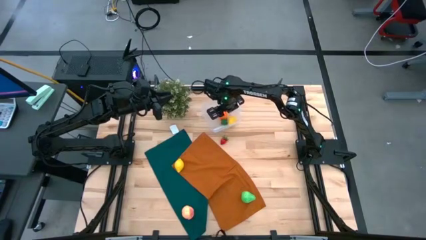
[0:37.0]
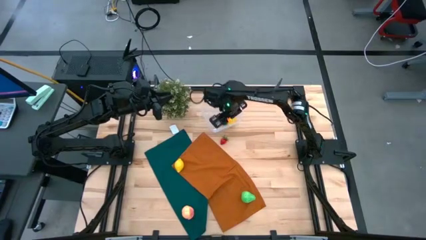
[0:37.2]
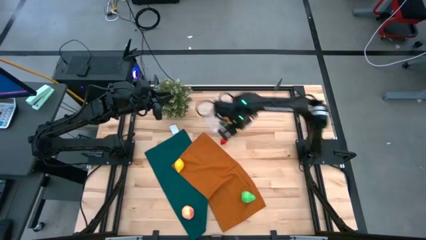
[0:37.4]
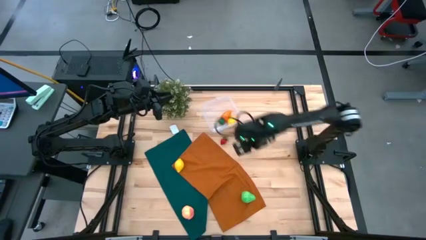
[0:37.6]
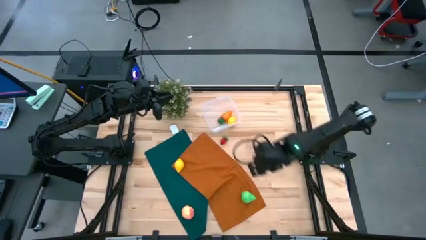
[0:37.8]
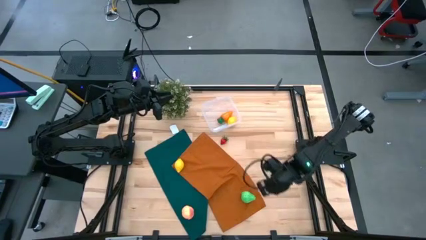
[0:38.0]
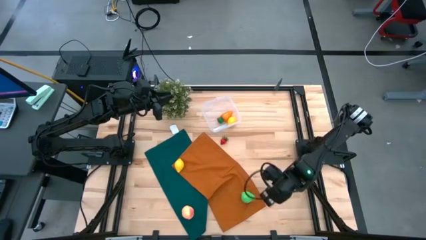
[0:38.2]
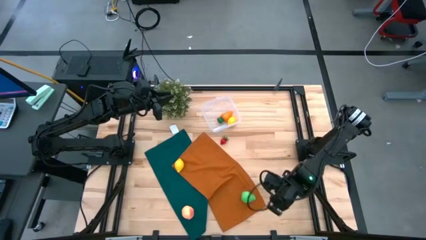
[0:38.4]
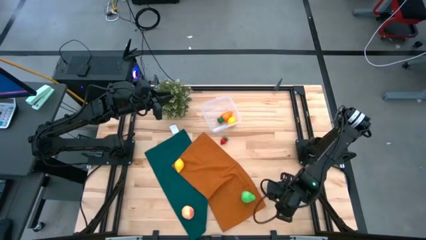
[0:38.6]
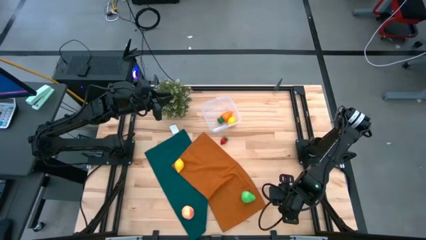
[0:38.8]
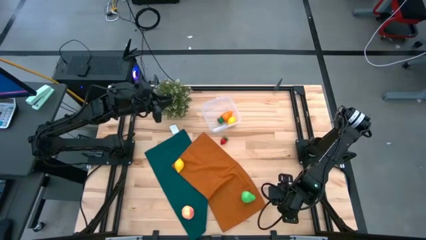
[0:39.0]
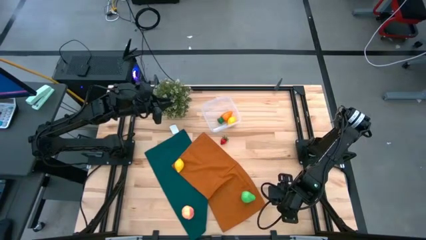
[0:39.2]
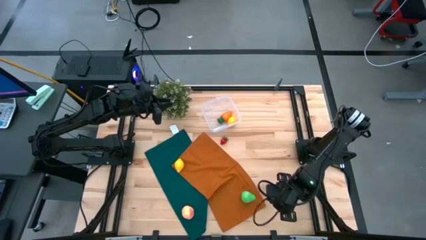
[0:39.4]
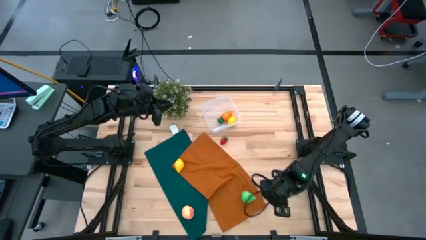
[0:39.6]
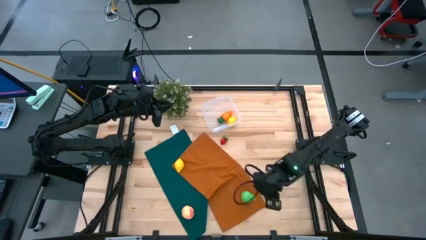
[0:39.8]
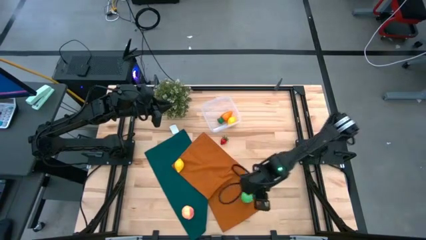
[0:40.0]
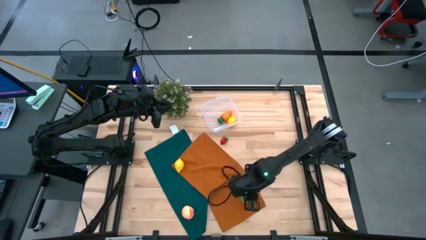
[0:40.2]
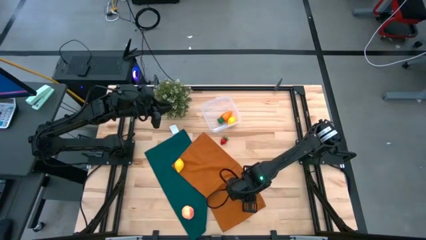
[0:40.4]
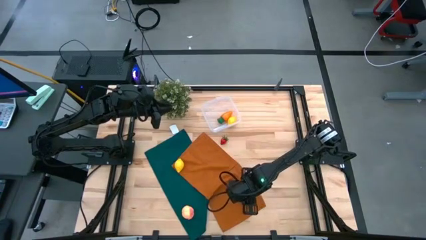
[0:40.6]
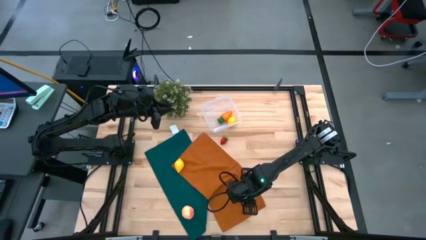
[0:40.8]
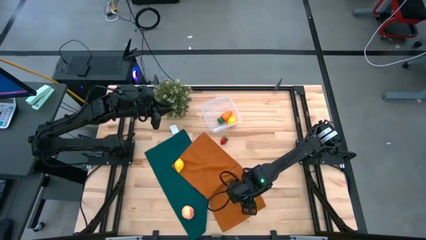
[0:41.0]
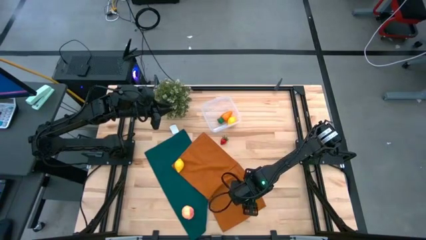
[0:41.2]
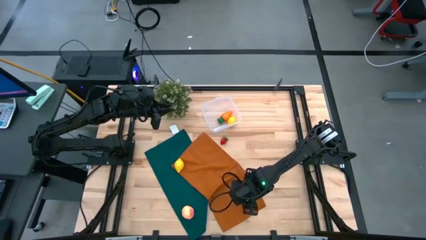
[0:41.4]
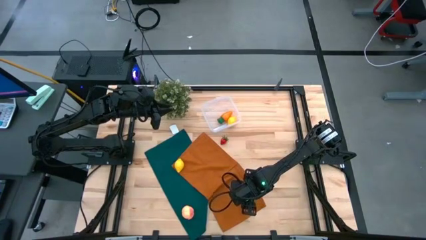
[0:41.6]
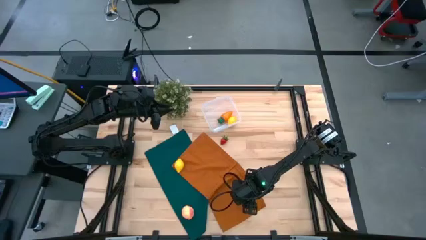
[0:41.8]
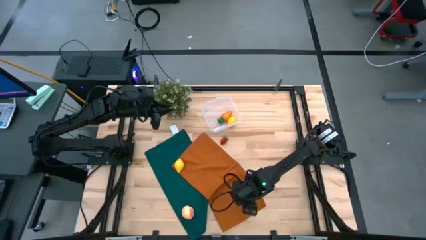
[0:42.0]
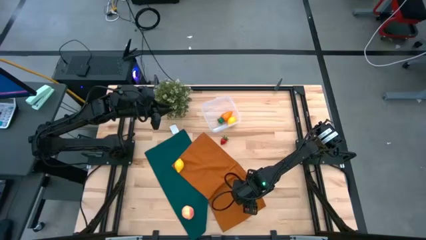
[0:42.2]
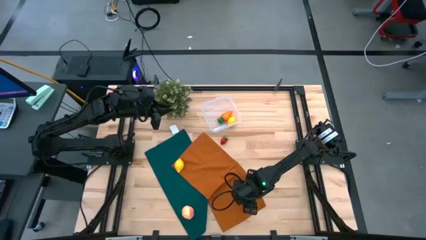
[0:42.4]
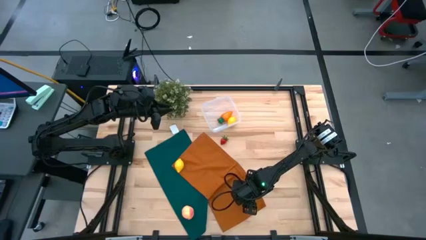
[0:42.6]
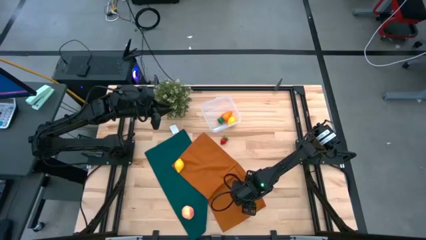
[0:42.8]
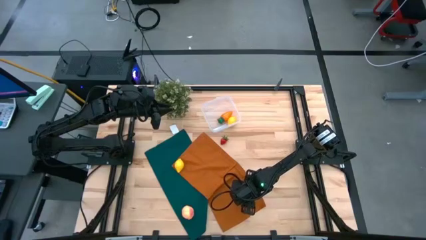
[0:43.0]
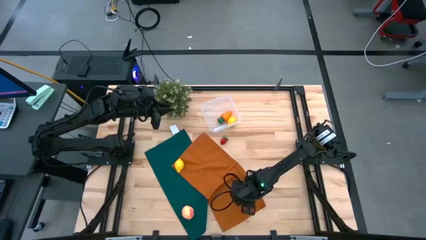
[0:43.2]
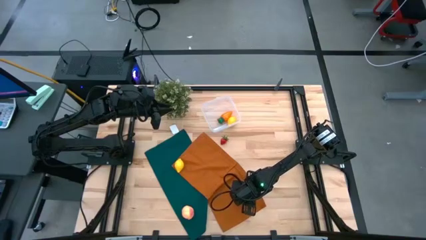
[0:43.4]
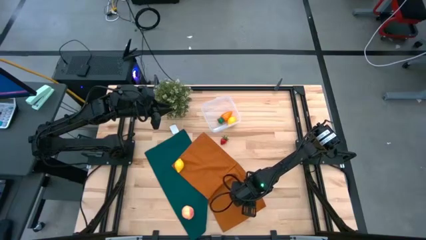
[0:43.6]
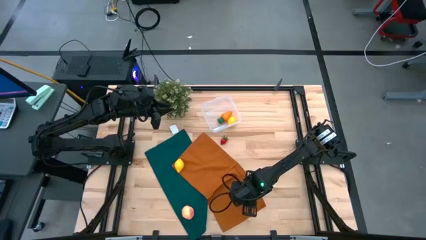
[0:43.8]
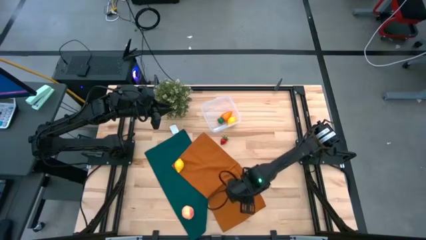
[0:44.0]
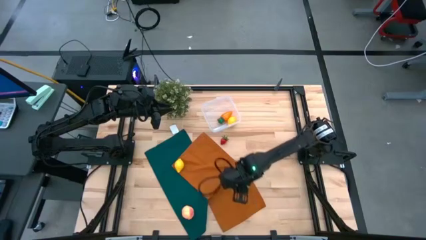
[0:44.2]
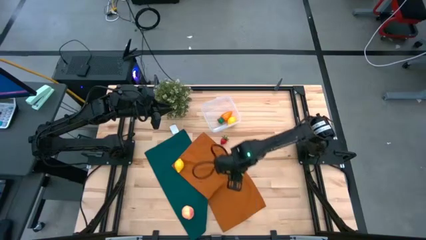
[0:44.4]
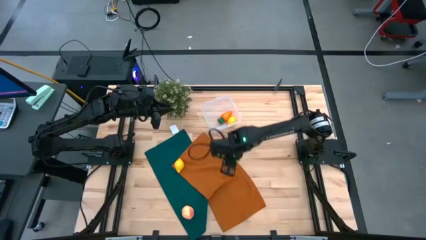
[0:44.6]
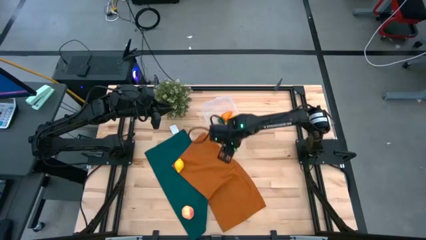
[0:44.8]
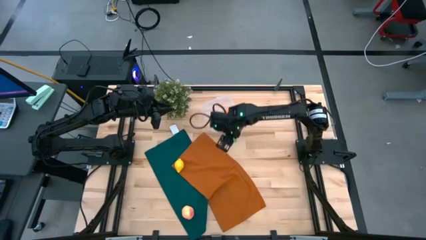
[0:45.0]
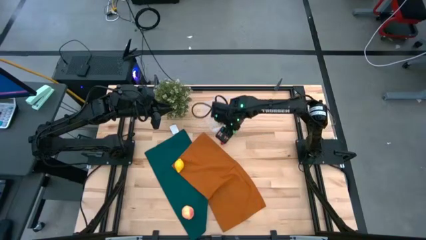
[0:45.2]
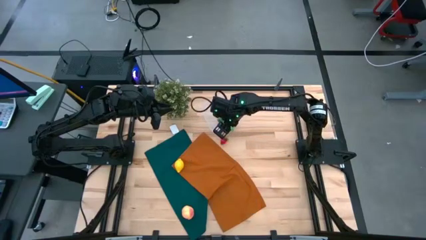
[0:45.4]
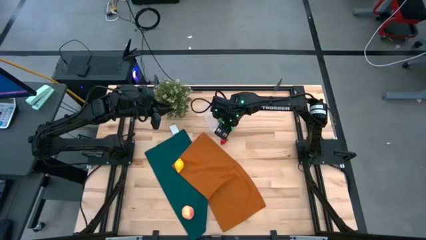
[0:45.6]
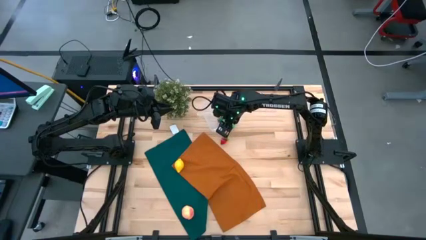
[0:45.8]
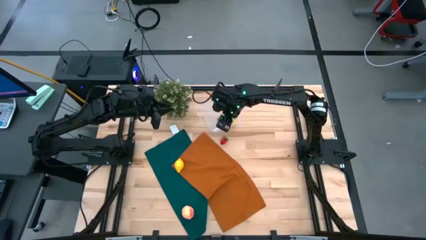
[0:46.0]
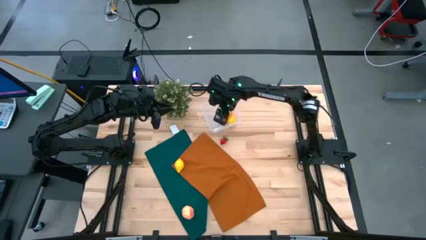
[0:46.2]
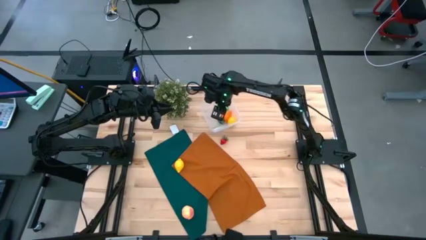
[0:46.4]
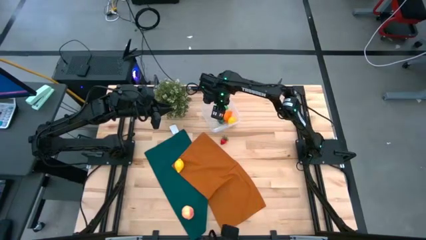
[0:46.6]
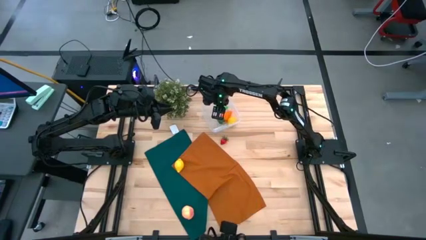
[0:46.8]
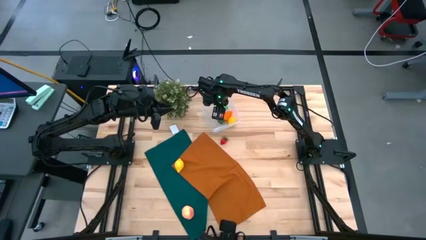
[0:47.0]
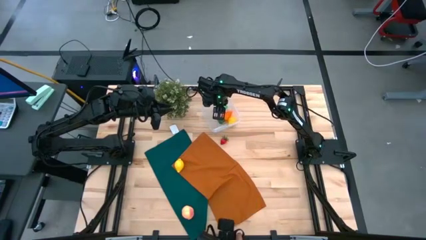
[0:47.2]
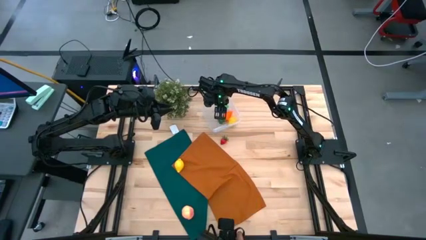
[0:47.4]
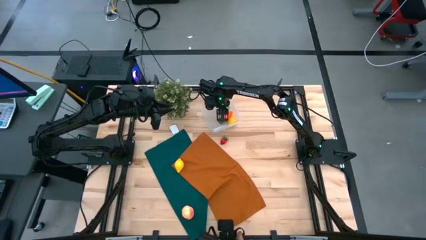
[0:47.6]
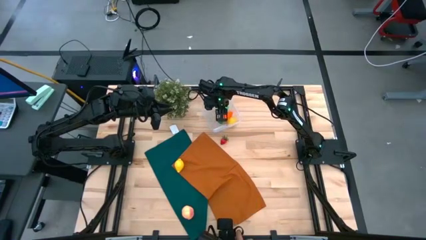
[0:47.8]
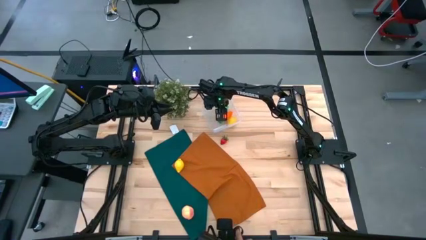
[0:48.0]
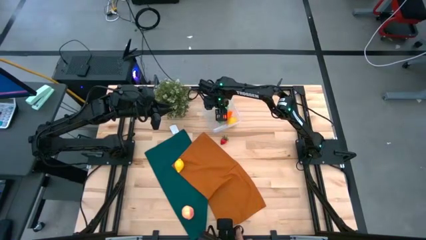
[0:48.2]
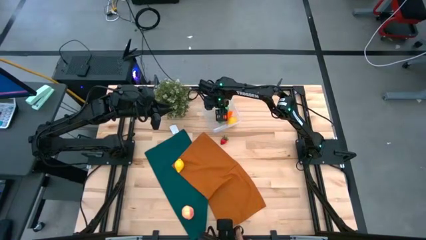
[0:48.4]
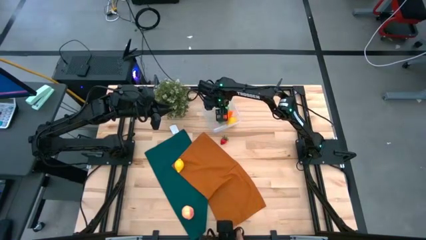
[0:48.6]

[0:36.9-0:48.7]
Task: Pick and placing Produce into tupperware
Put the green pear into the transparent bin

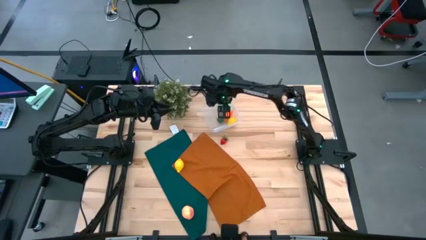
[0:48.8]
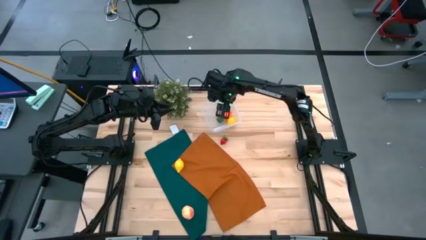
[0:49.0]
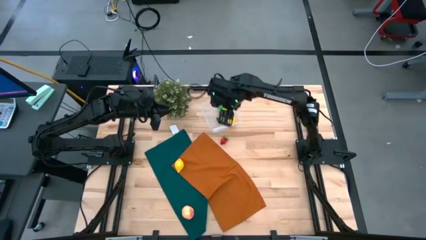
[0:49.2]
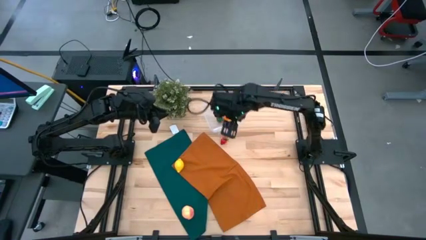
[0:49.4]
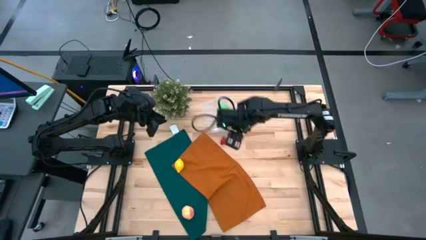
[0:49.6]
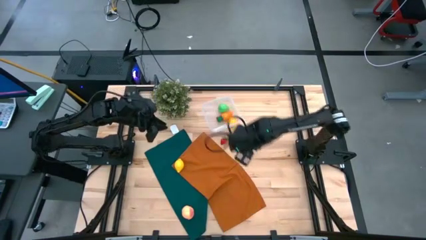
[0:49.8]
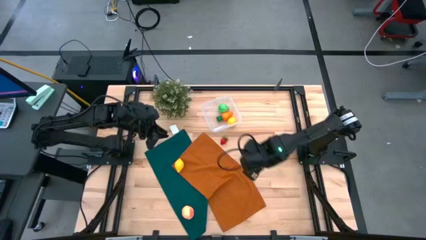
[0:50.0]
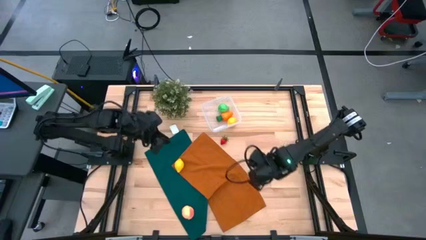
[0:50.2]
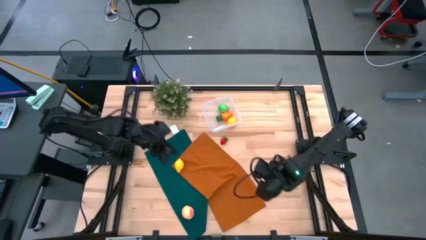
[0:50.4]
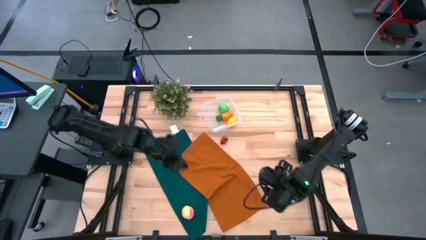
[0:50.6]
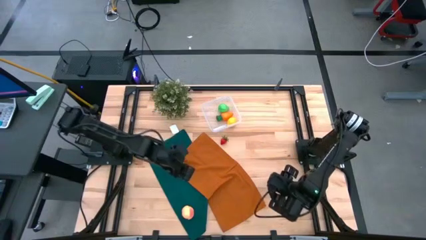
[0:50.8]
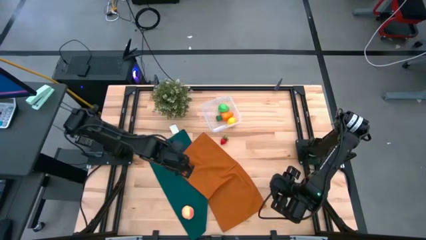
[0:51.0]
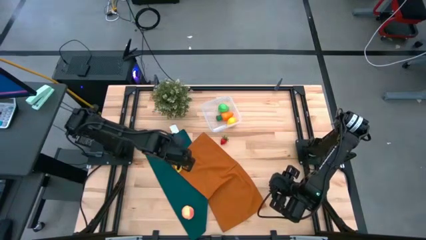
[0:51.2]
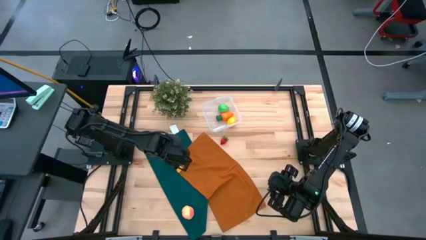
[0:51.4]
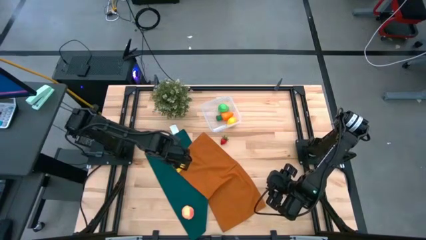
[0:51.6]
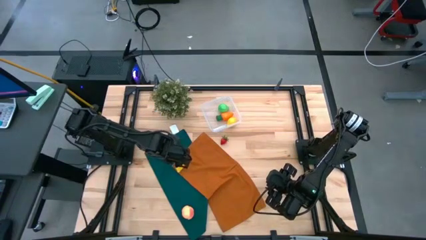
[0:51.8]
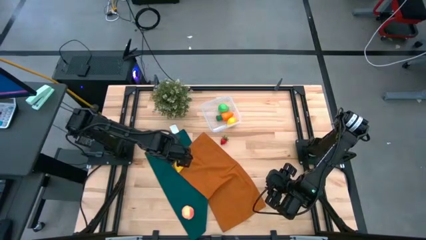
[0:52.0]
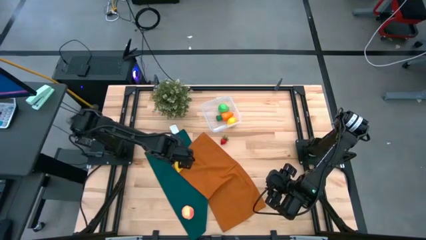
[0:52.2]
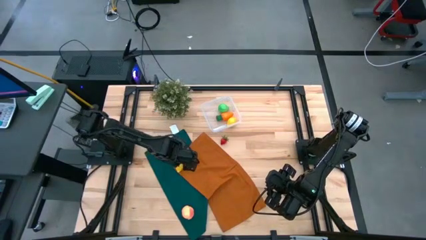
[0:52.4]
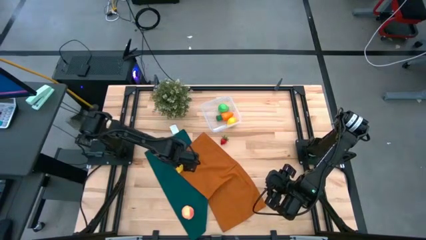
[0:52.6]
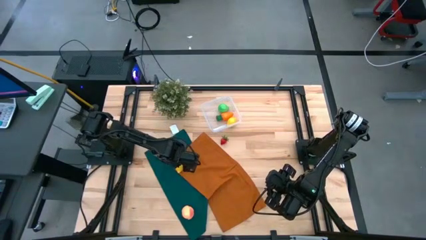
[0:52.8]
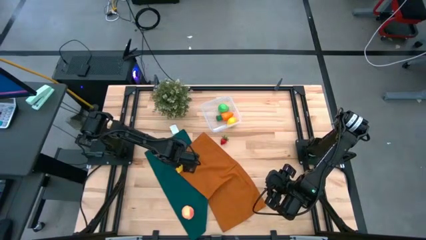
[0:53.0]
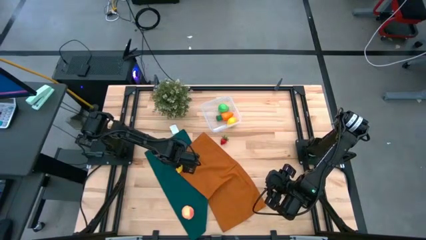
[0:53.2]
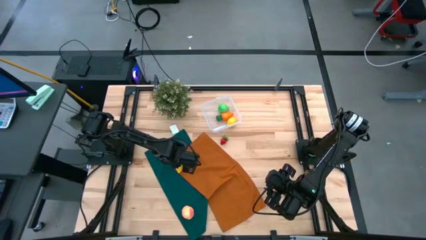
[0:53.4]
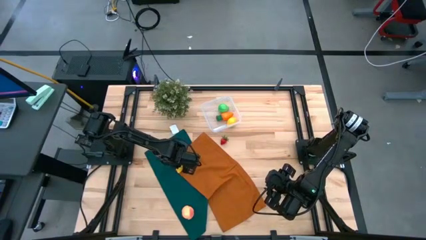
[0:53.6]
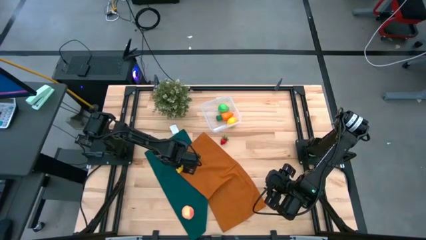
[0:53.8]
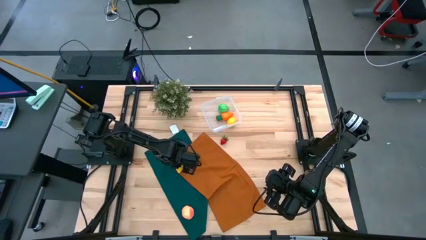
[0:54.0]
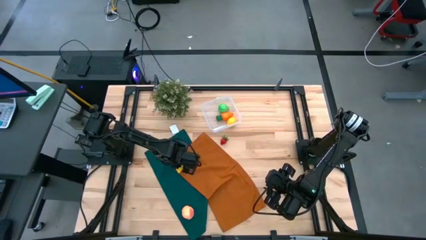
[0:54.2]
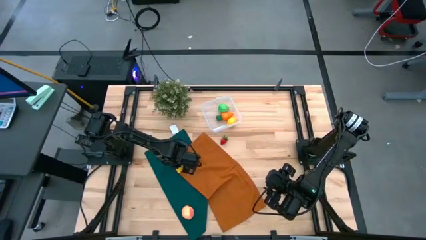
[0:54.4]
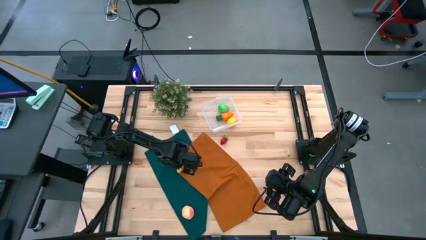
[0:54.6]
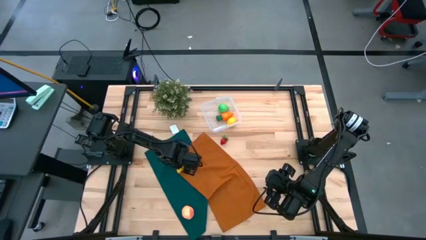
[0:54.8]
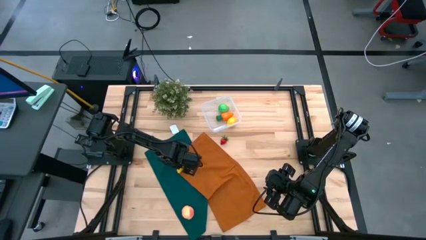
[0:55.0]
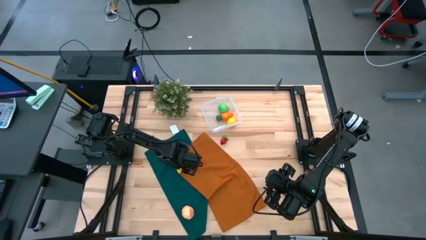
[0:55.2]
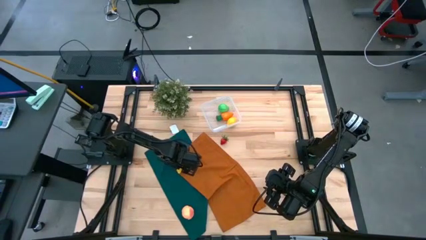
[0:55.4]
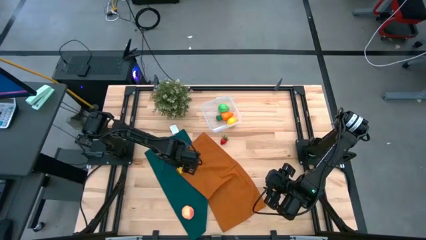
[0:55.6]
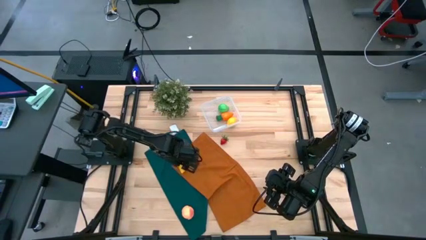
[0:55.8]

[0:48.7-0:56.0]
Put the yellow lemon into the transparent bin
